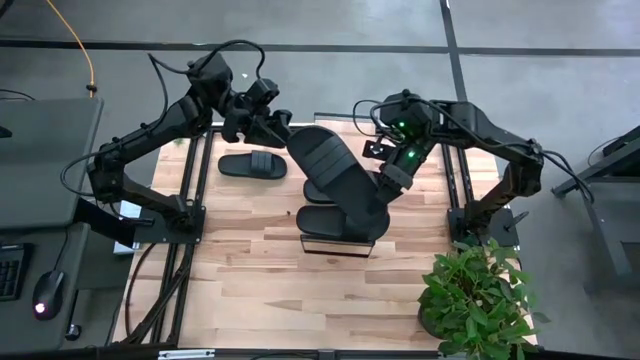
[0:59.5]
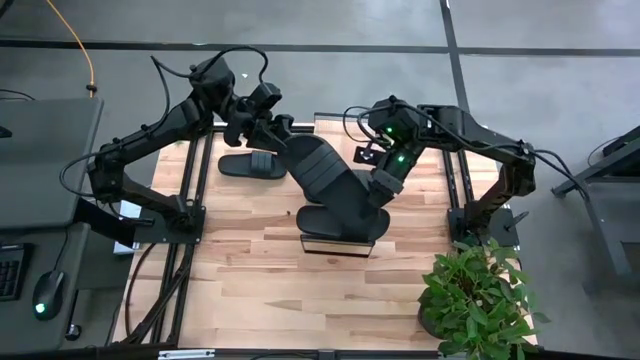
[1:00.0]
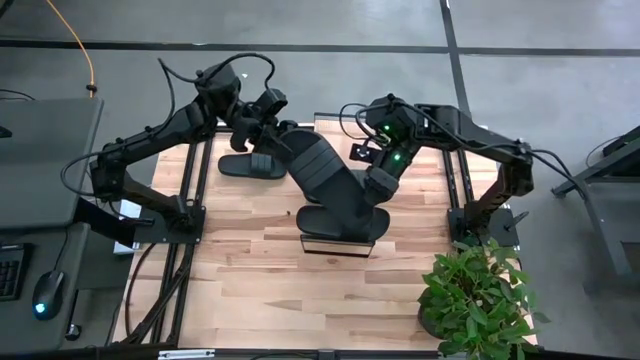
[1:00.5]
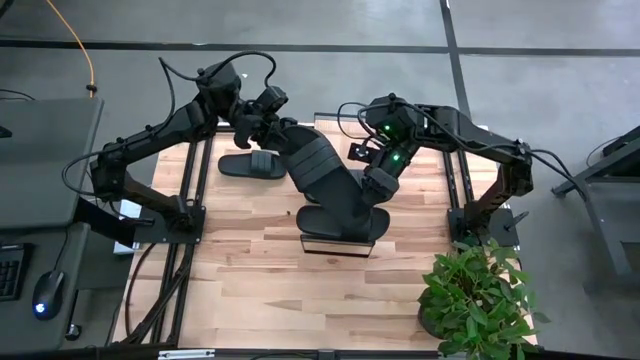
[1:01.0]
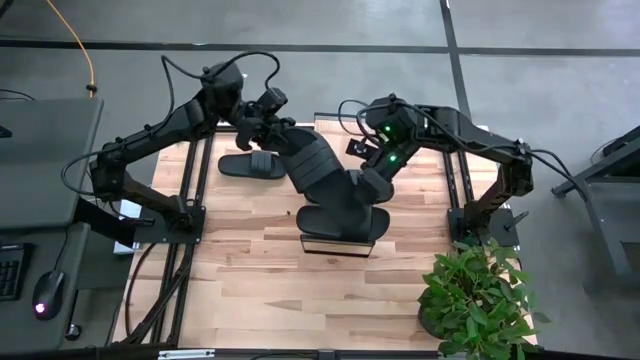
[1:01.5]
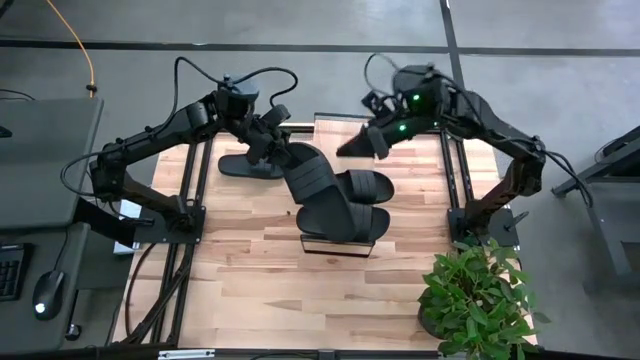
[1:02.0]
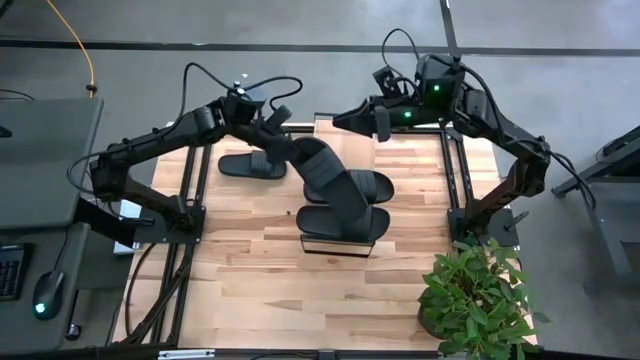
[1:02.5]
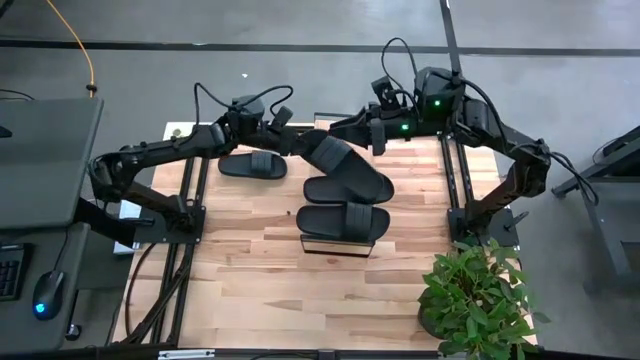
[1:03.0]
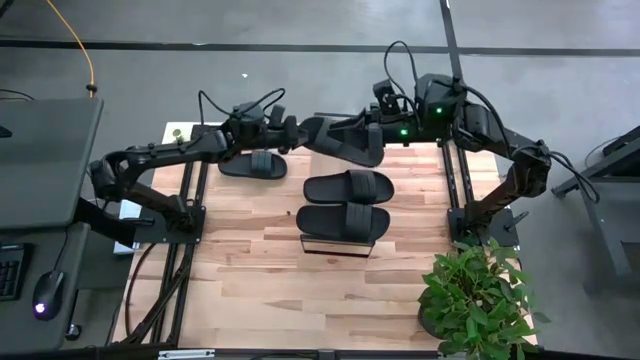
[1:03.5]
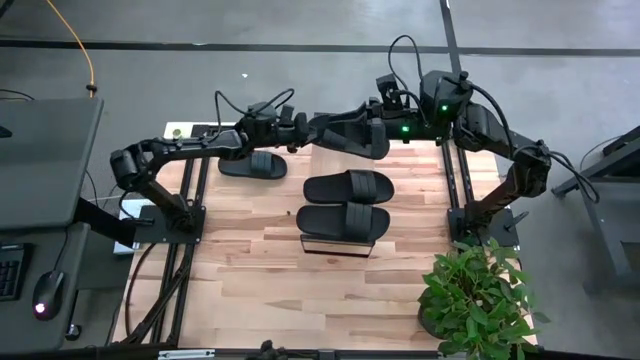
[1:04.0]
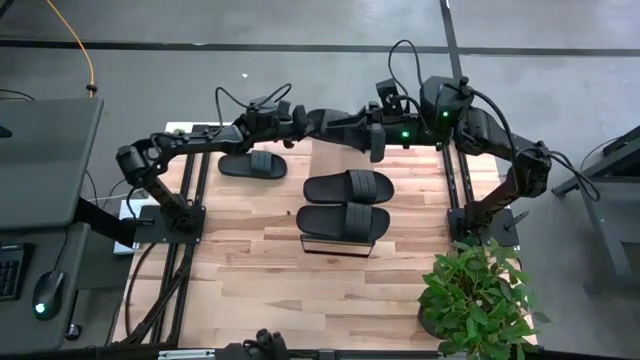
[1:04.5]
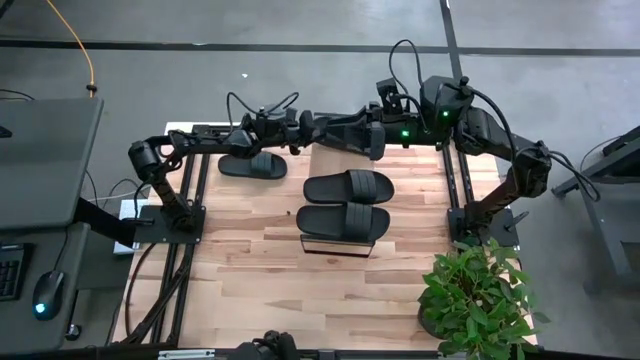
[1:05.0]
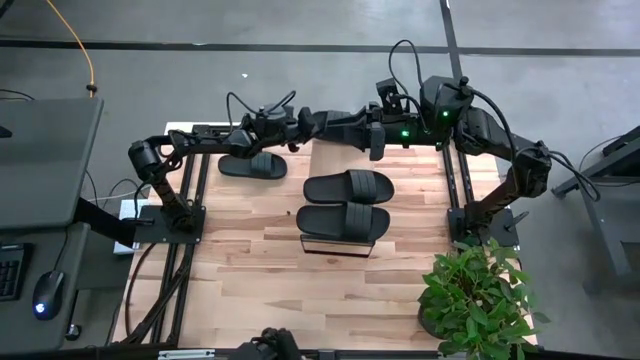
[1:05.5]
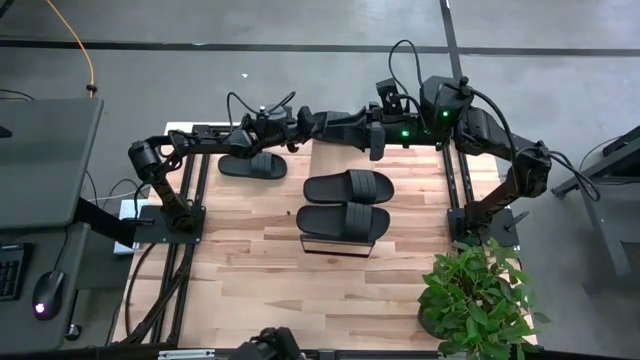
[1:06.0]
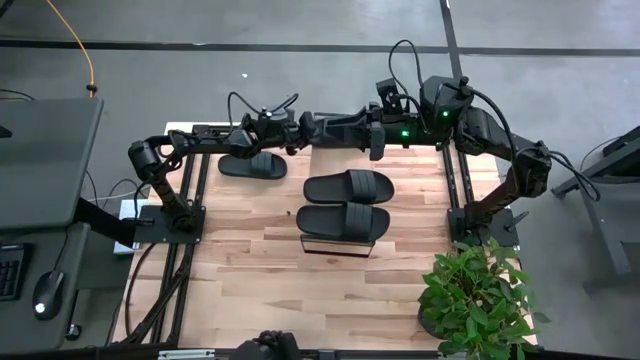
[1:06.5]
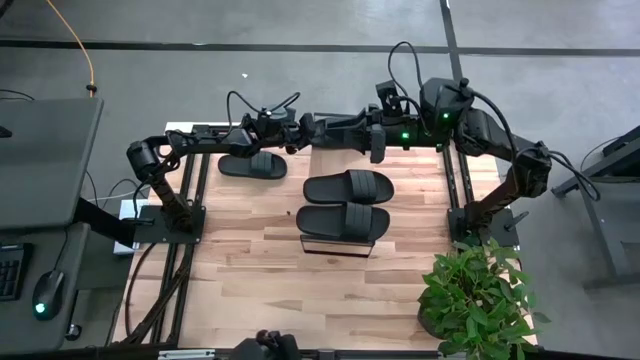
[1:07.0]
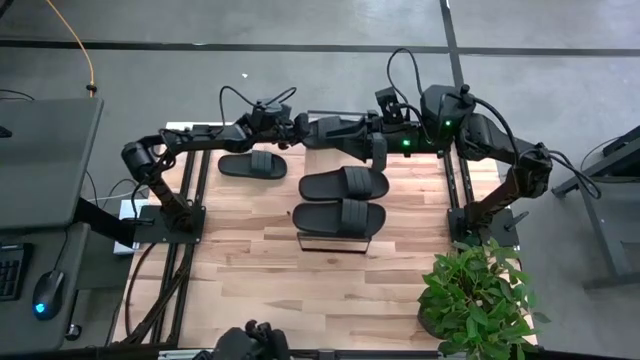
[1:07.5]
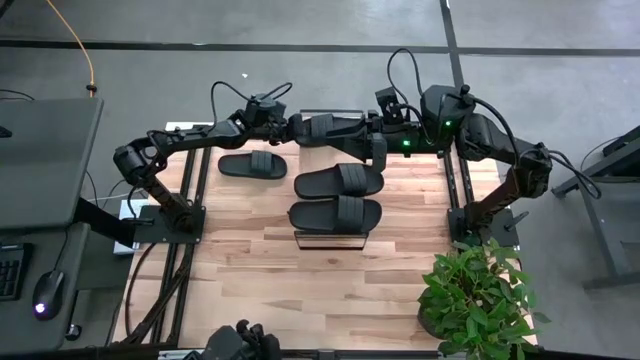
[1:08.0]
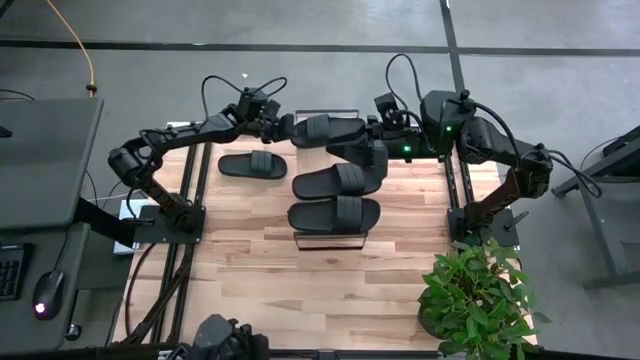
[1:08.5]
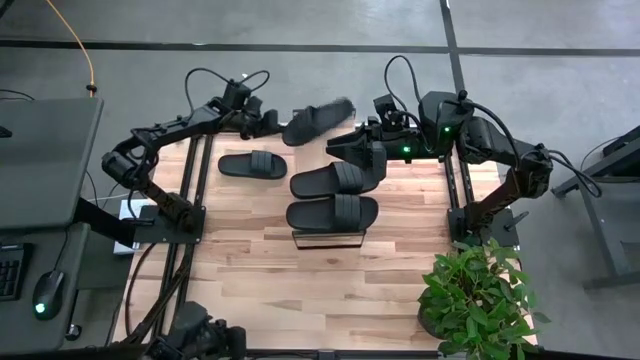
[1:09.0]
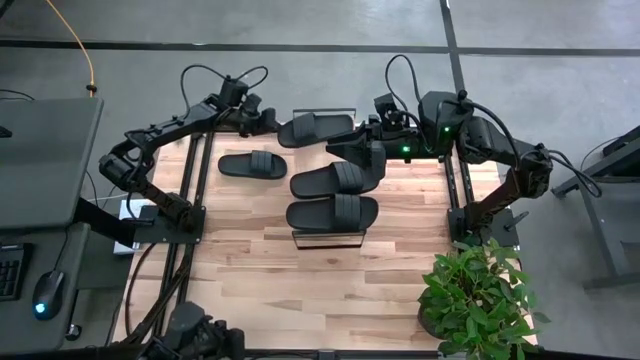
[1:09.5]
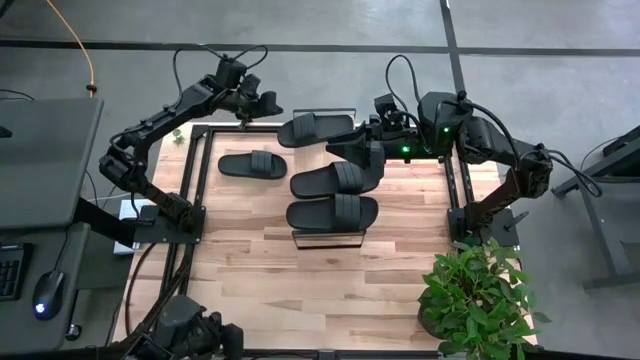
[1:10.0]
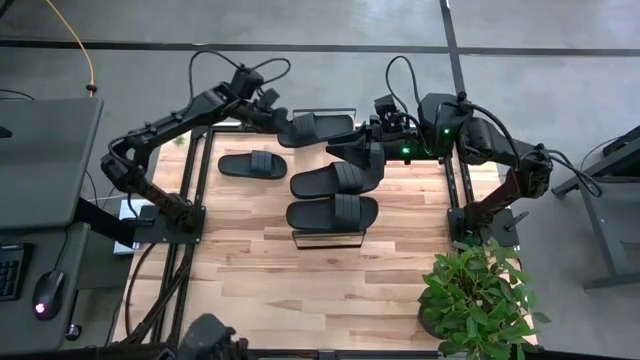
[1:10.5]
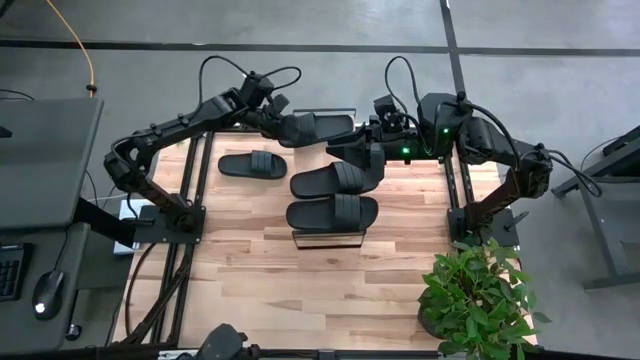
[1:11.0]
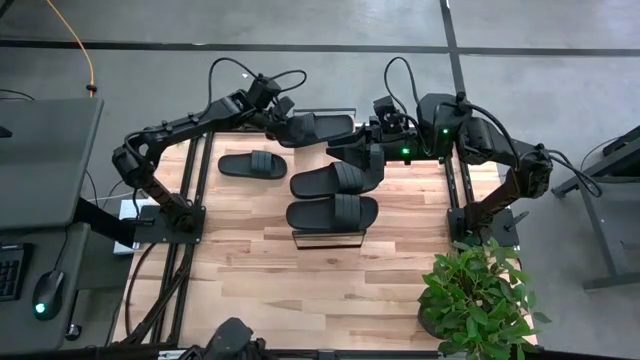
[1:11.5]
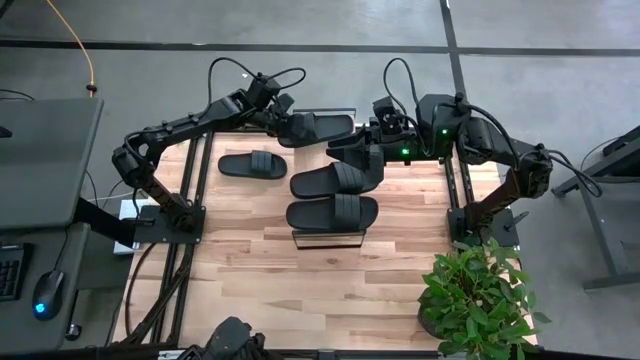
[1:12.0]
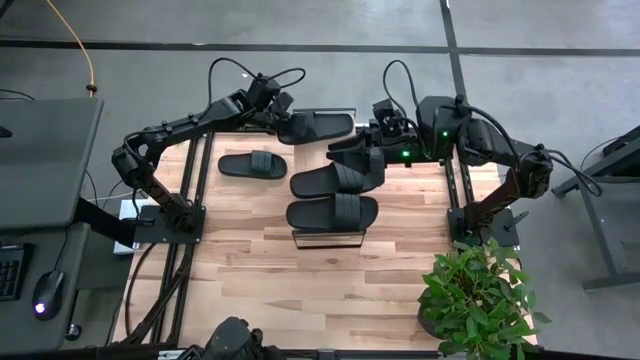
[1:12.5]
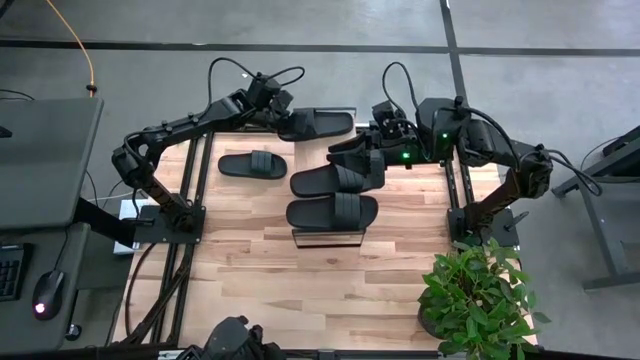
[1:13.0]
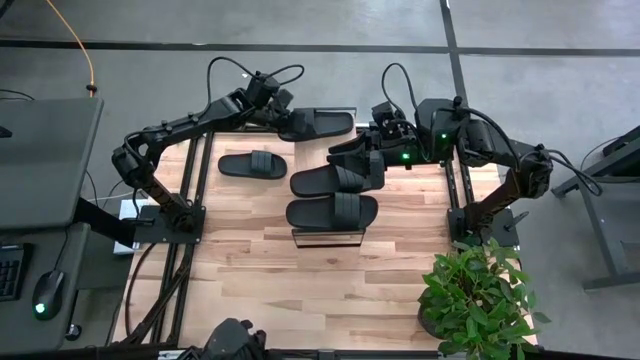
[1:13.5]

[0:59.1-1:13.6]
Task: Pick and place slides into the shelf
Put the black slide on the shelf

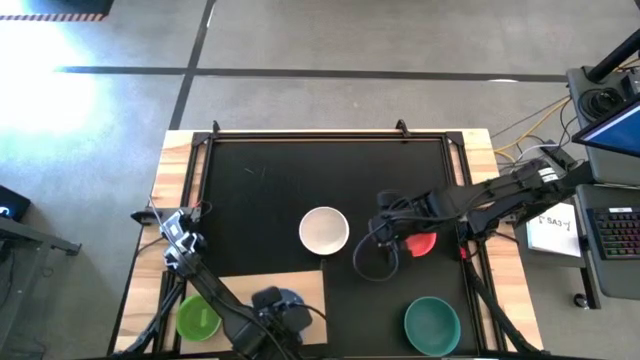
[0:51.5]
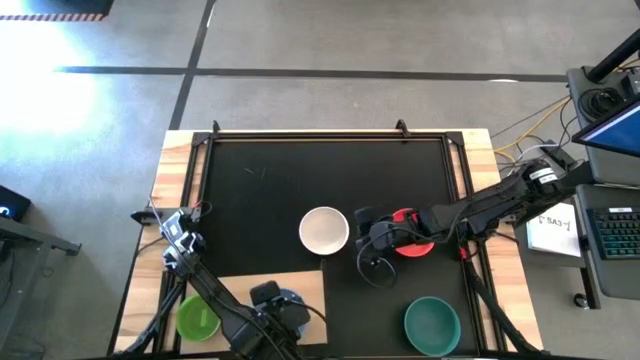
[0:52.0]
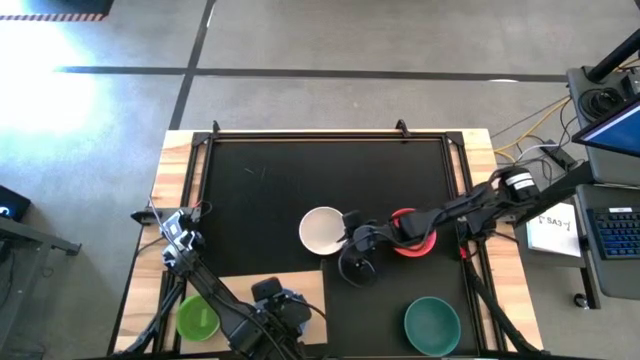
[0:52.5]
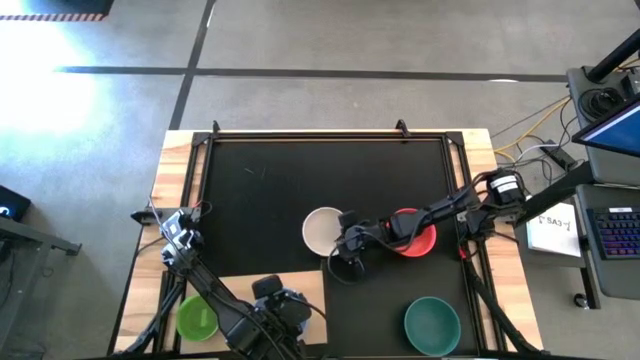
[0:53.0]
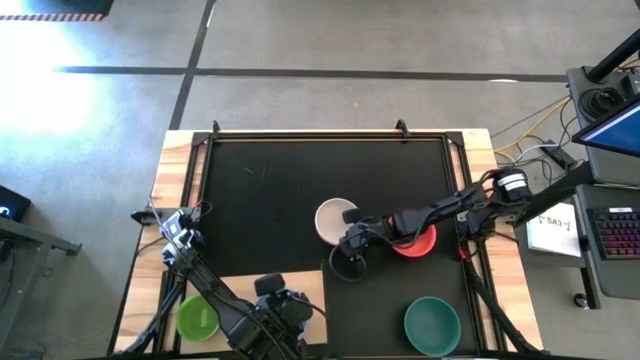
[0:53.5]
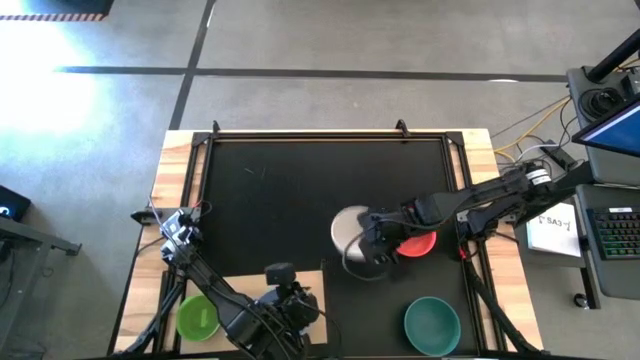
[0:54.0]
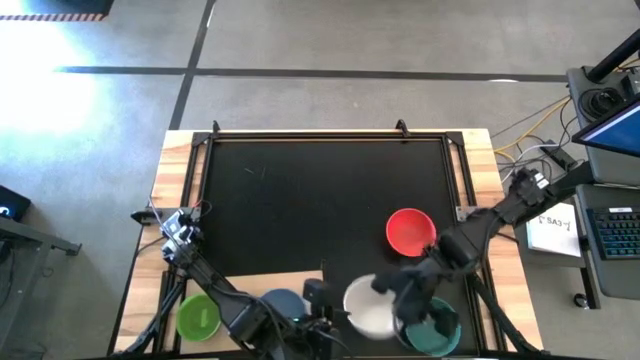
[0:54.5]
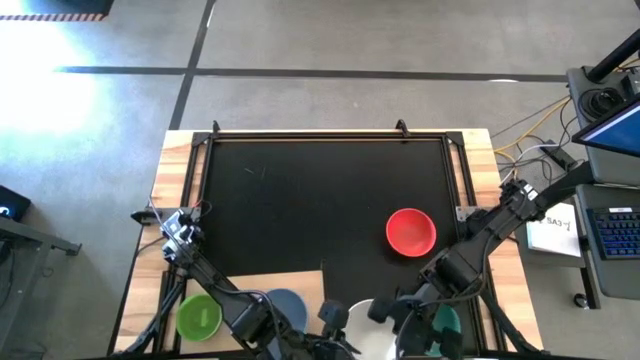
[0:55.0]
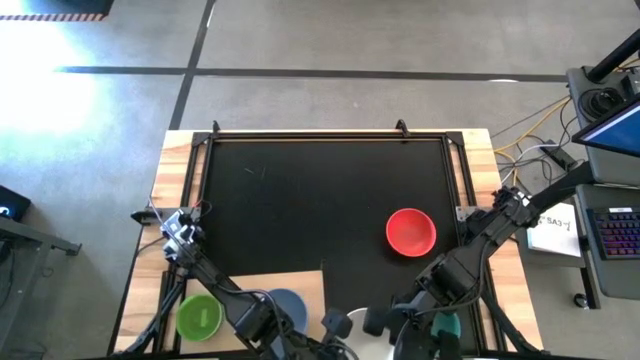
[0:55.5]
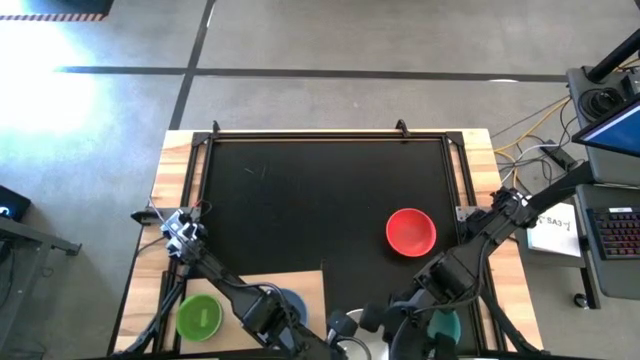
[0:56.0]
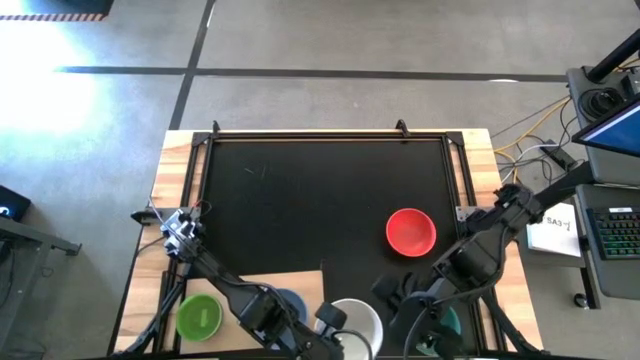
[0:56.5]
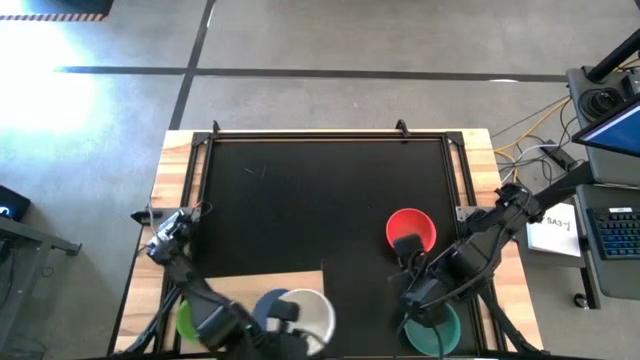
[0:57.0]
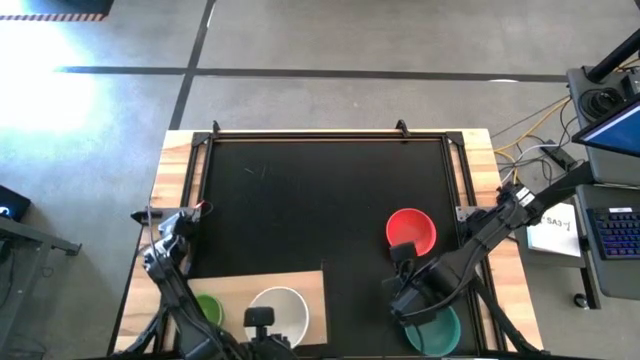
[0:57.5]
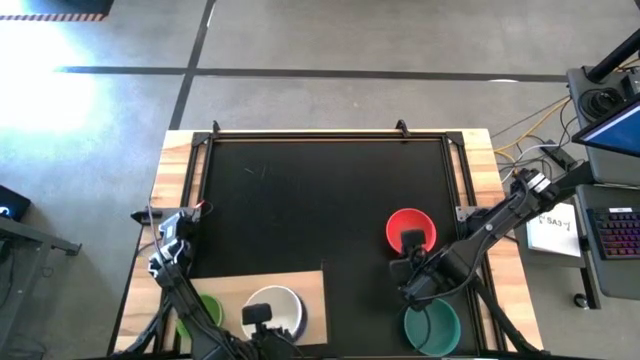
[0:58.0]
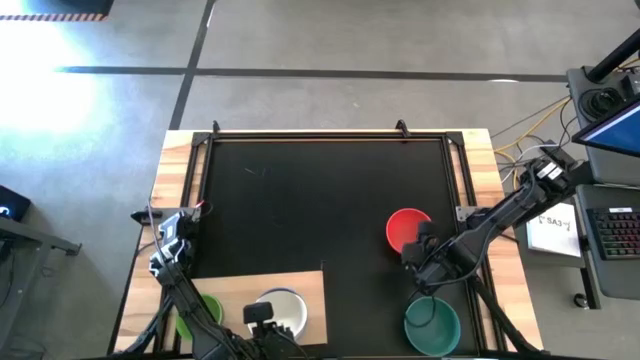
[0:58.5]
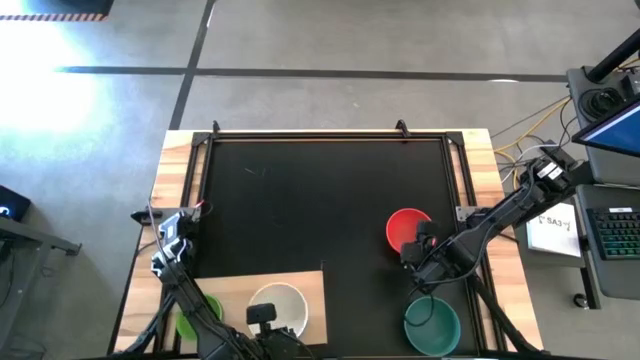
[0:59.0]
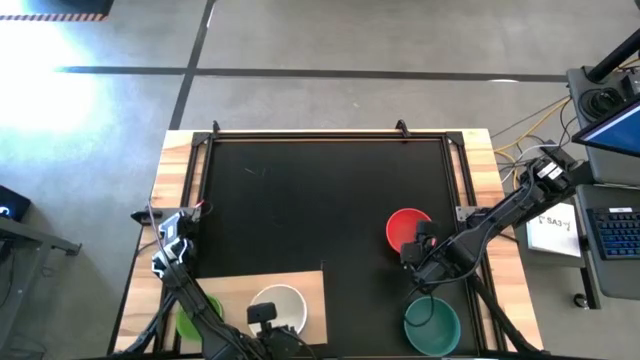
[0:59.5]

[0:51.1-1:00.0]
Task: Place and stack bowls onto a shelf
Stack the white bowl on the of the purple bowl on the shelf
